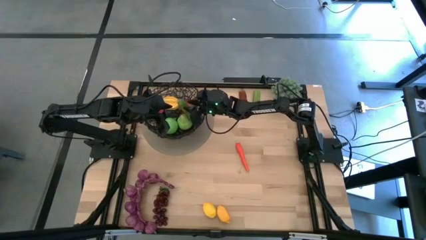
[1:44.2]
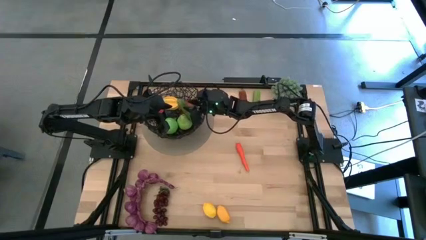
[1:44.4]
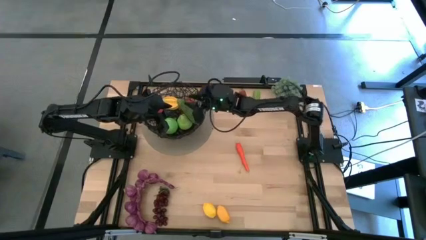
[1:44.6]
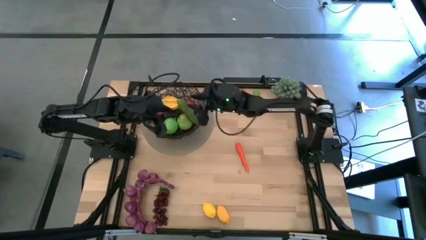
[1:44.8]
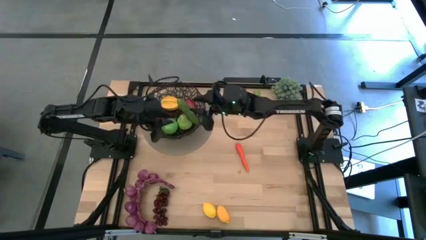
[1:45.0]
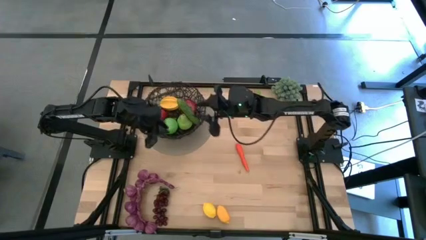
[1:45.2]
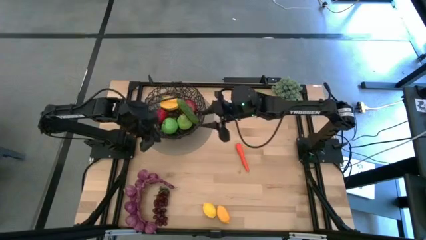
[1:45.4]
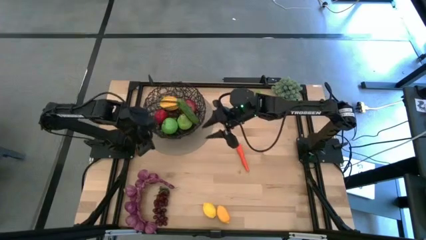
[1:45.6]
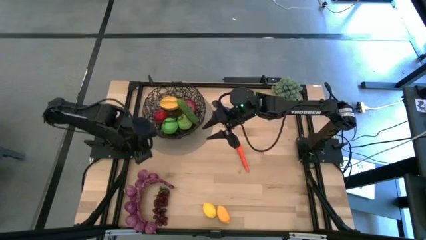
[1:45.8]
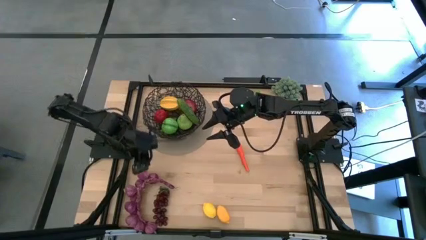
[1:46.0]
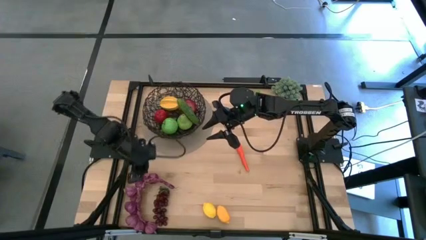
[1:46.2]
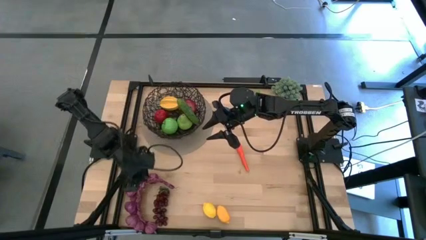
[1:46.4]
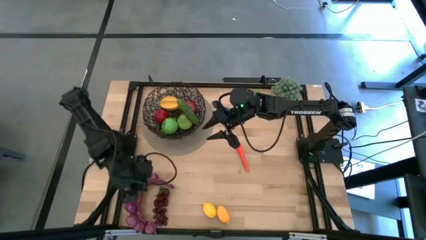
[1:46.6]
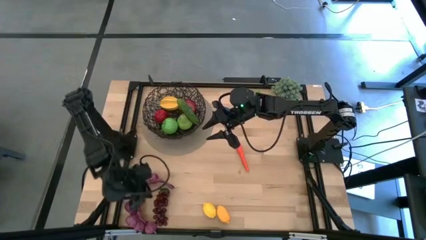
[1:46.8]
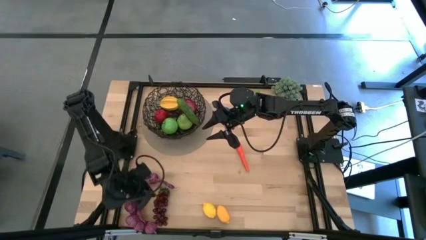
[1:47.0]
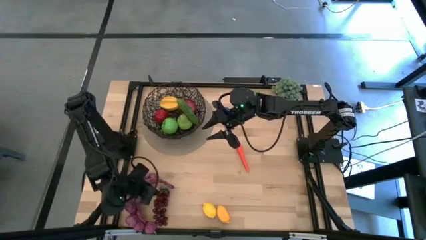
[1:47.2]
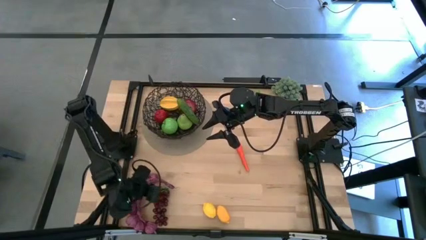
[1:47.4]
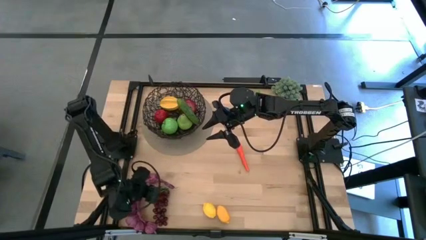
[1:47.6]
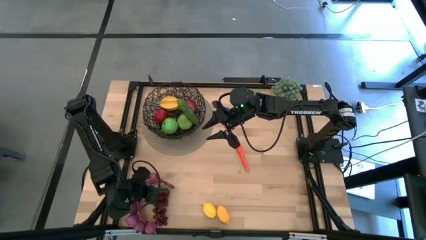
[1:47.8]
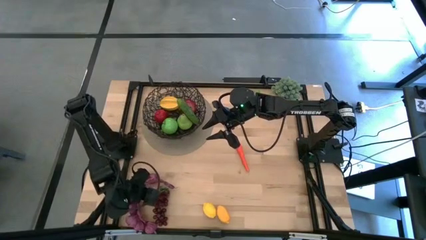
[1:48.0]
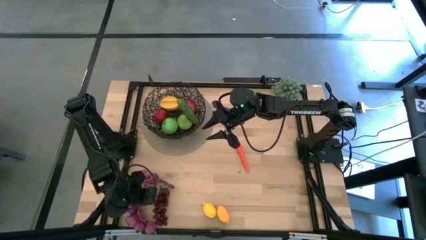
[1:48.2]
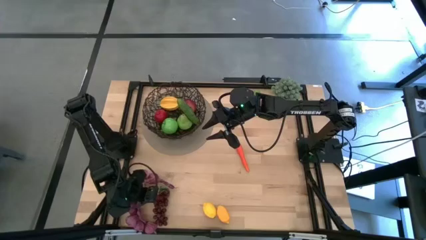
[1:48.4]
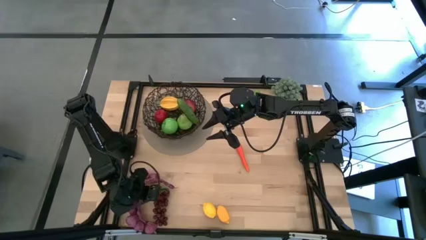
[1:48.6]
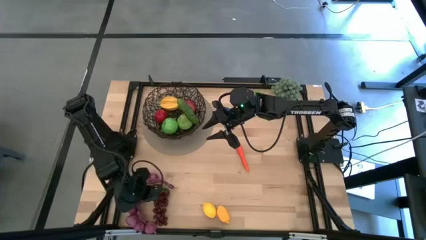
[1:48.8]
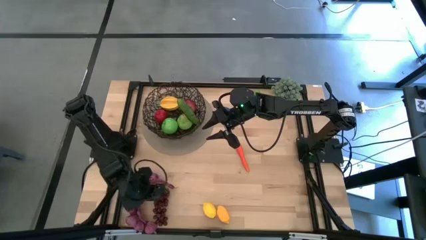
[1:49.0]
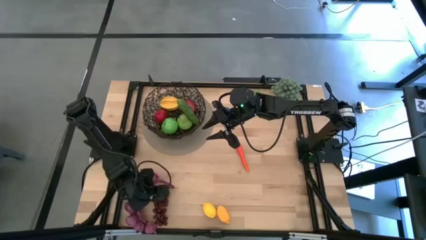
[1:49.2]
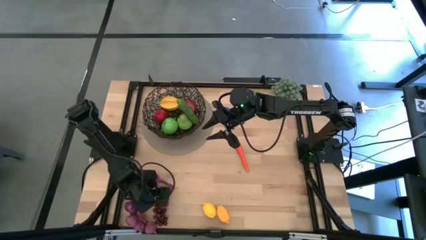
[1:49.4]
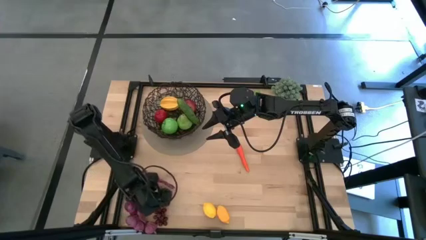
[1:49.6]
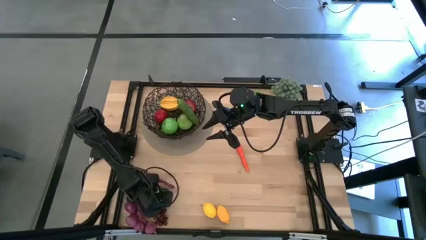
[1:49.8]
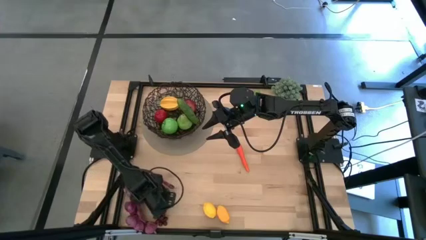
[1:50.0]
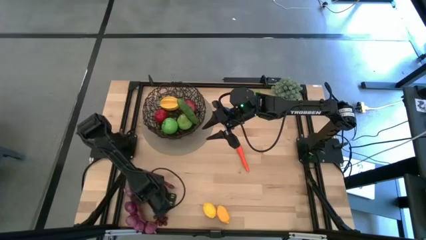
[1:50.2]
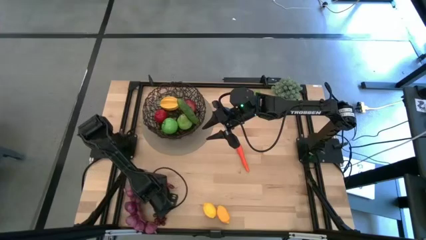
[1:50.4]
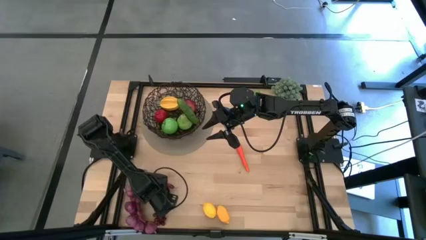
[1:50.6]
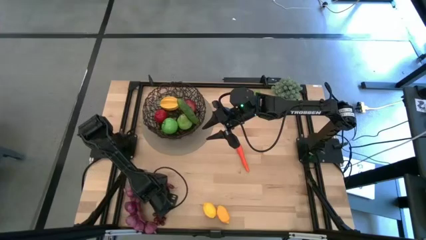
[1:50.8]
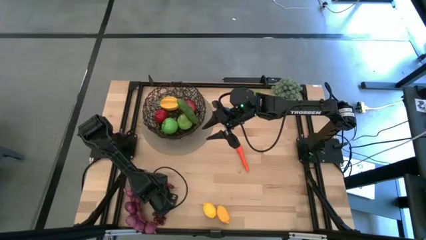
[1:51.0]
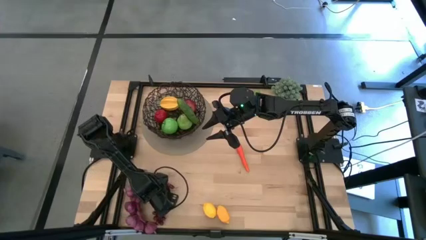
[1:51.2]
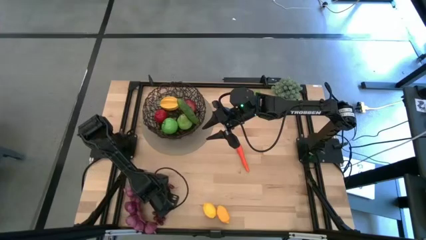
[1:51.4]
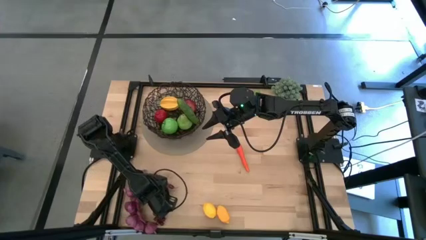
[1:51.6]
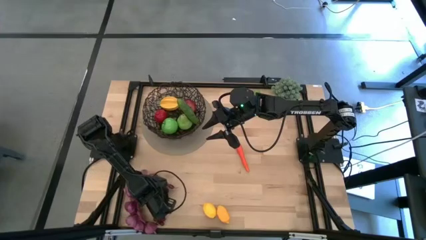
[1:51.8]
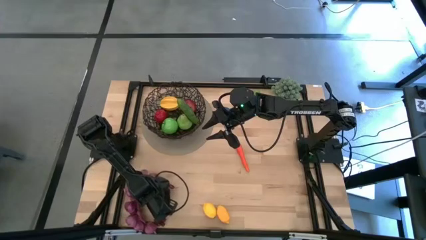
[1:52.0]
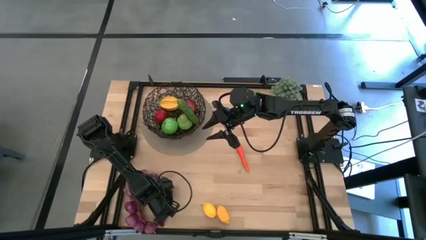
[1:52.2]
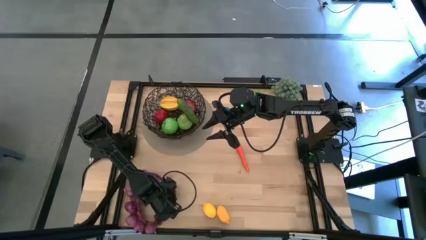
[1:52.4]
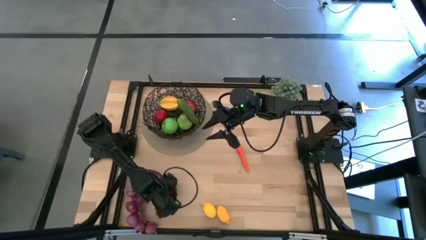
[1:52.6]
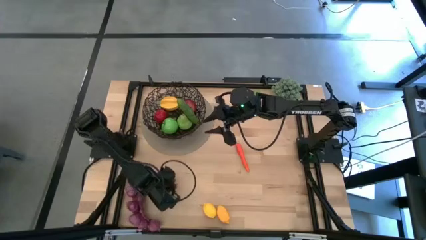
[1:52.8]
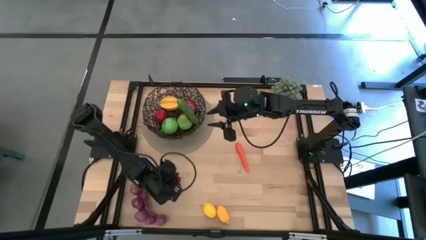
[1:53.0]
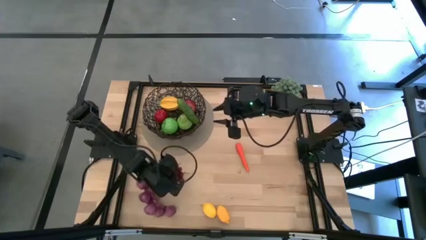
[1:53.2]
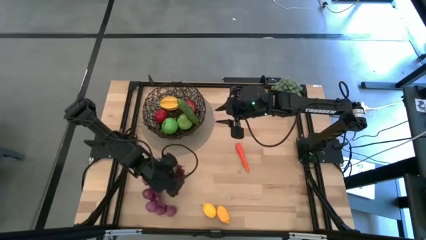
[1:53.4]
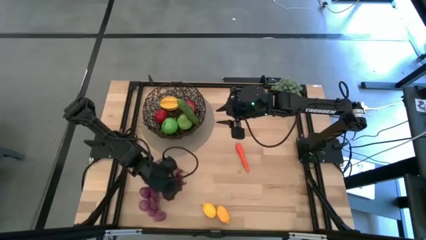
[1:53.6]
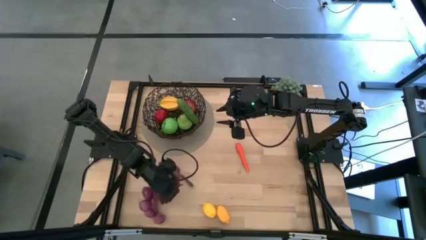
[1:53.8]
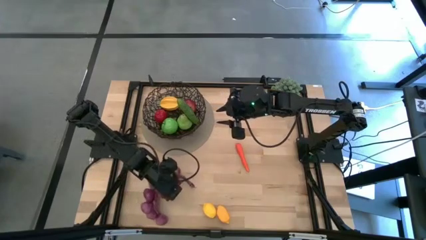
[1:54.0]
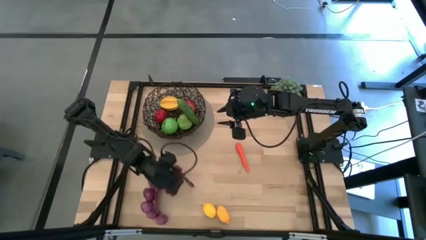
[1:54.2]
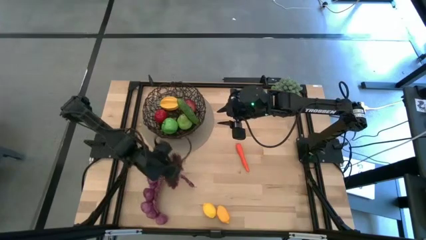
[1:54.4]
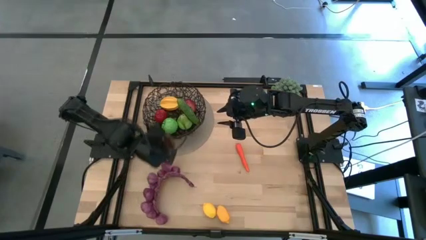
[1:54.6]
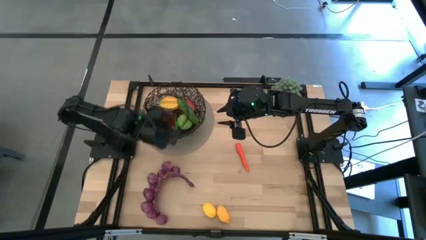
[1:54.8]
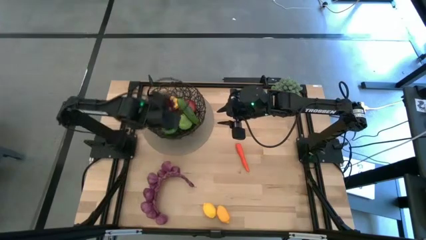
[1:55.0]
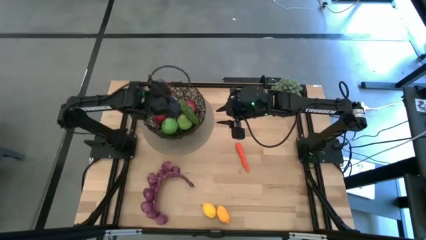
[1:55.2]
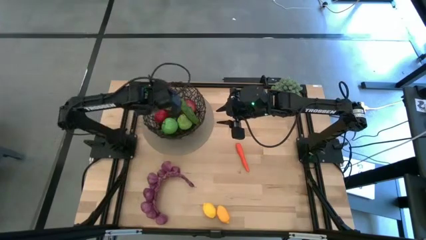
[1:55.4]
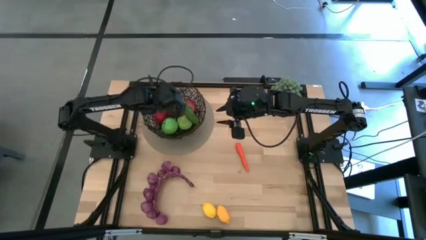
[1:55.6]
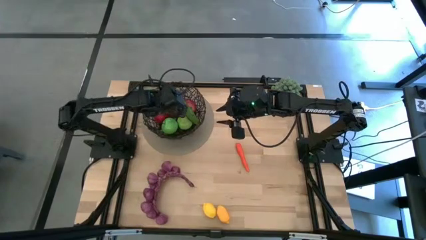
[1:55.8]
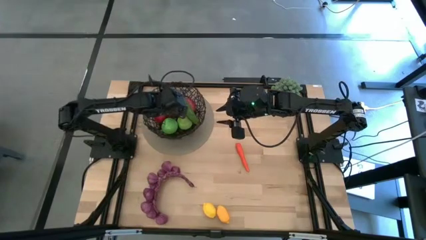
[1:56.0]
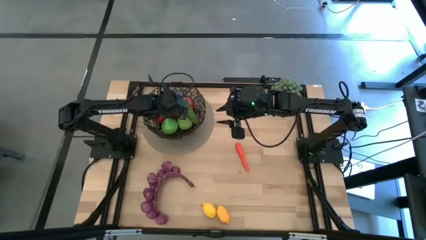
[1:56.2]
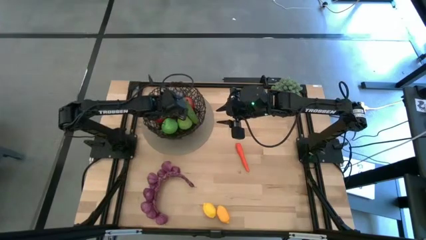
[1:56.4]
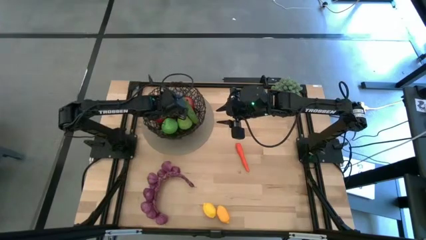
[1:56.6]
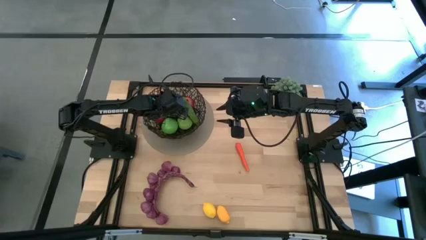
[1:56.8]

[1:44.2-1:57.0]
Task: Build produce basket
Put the dark red grapes into the black wire basket
